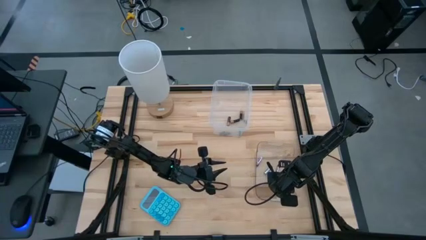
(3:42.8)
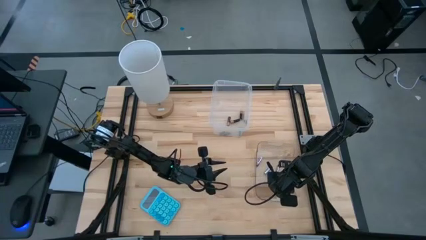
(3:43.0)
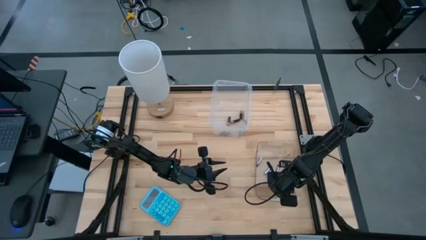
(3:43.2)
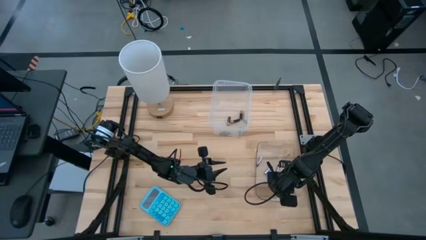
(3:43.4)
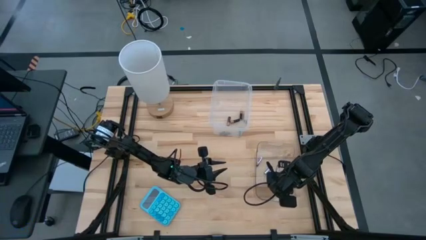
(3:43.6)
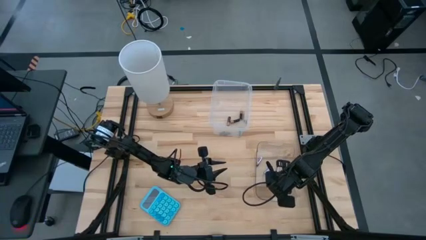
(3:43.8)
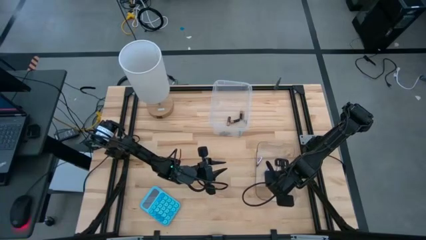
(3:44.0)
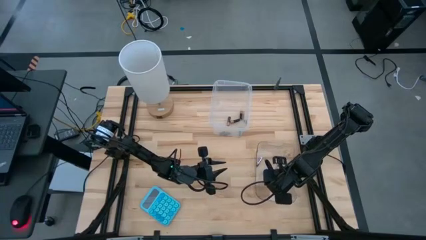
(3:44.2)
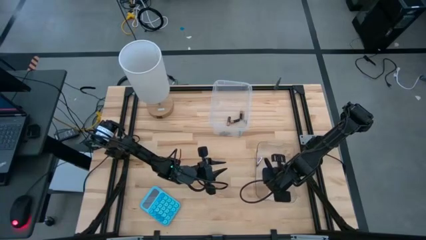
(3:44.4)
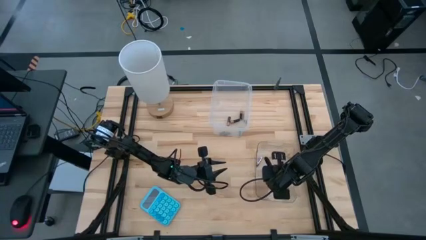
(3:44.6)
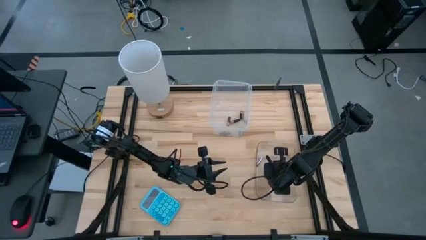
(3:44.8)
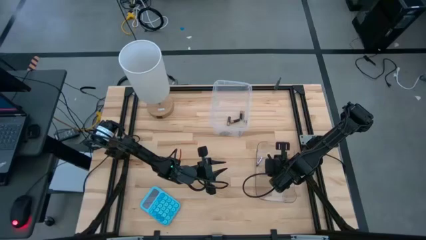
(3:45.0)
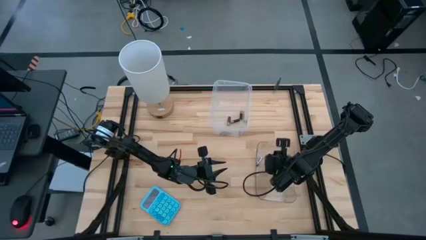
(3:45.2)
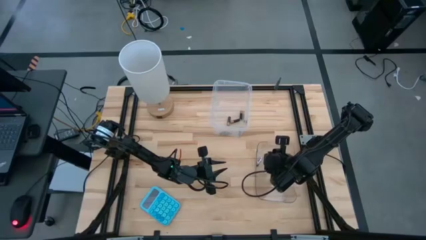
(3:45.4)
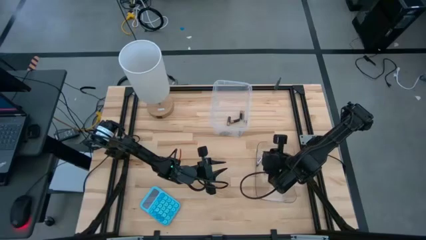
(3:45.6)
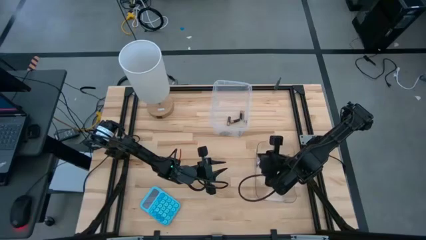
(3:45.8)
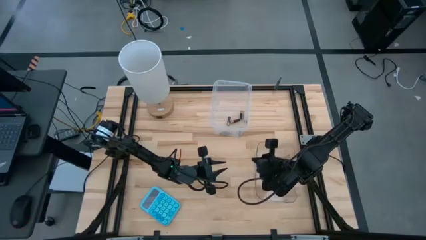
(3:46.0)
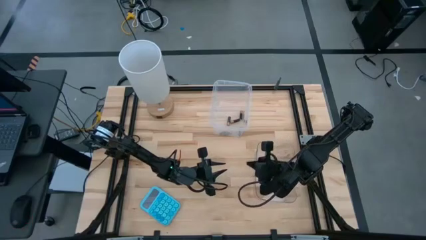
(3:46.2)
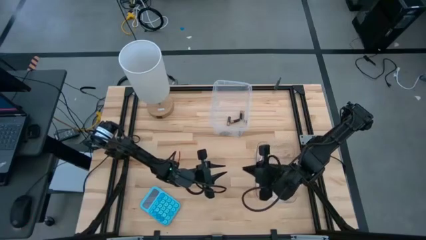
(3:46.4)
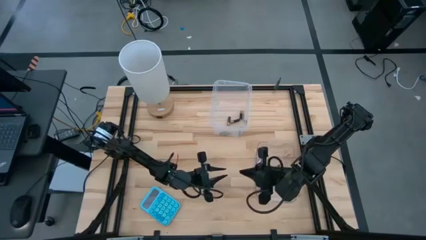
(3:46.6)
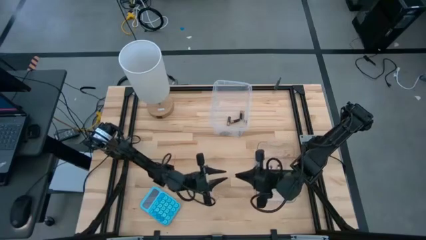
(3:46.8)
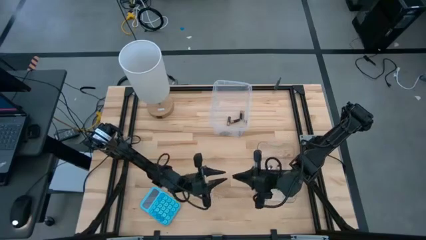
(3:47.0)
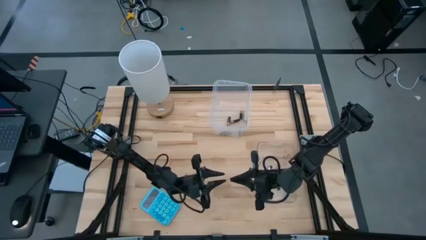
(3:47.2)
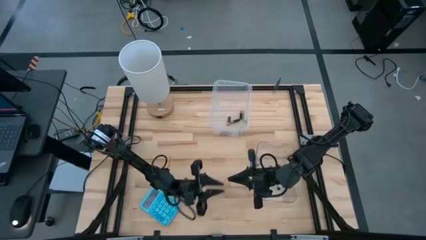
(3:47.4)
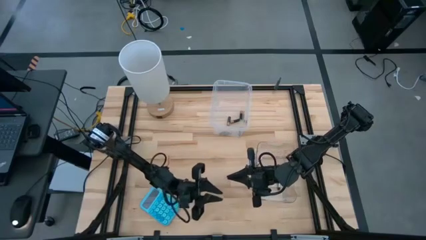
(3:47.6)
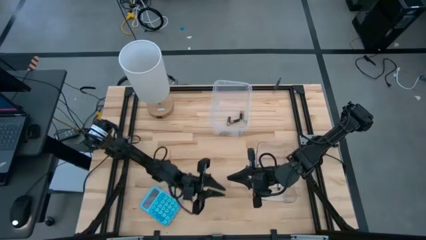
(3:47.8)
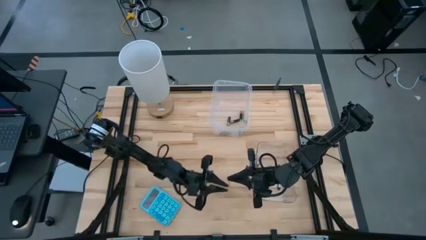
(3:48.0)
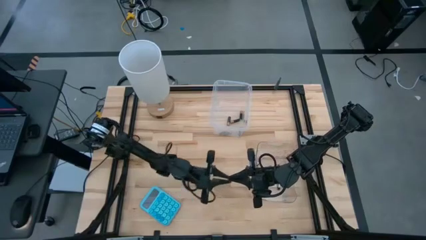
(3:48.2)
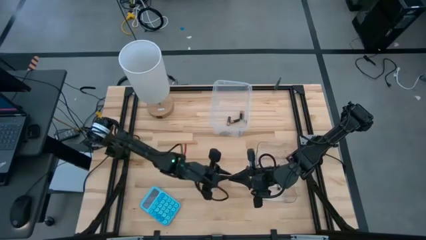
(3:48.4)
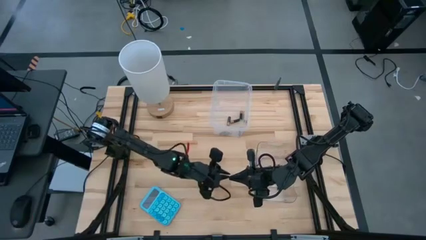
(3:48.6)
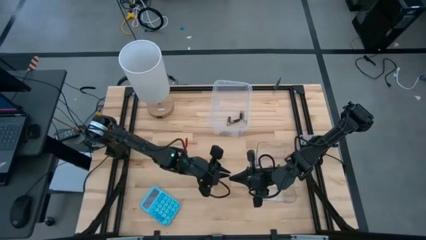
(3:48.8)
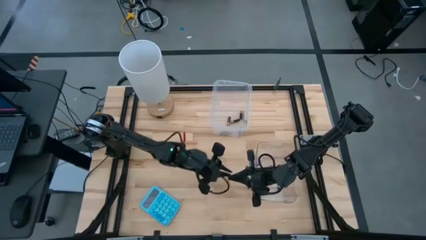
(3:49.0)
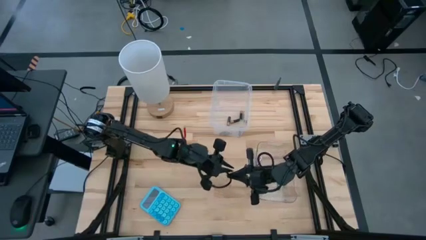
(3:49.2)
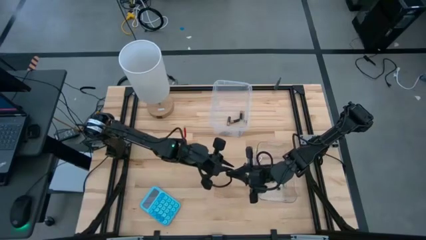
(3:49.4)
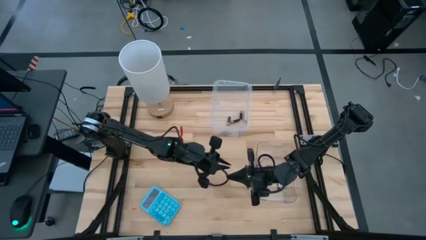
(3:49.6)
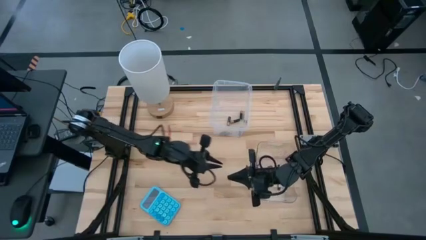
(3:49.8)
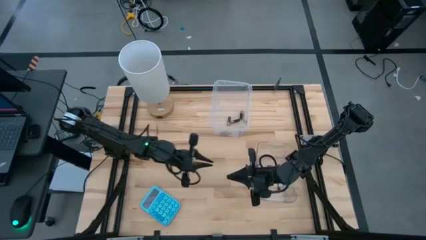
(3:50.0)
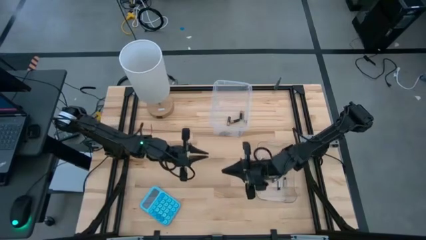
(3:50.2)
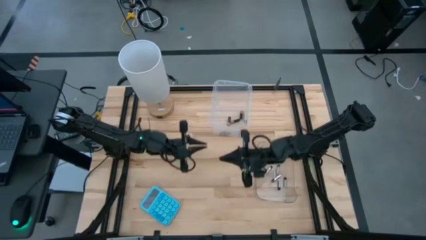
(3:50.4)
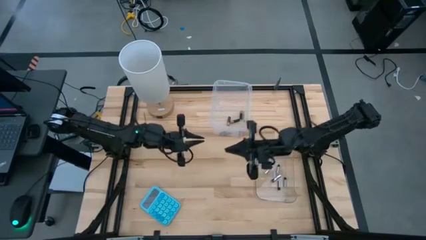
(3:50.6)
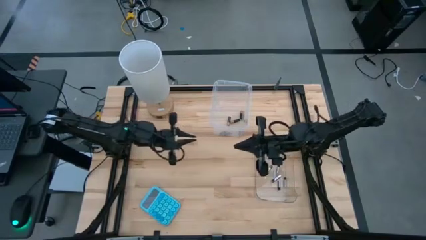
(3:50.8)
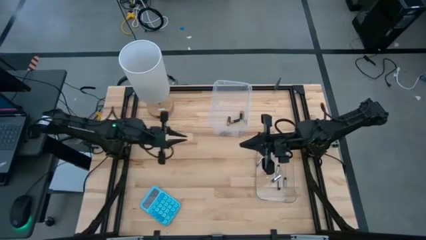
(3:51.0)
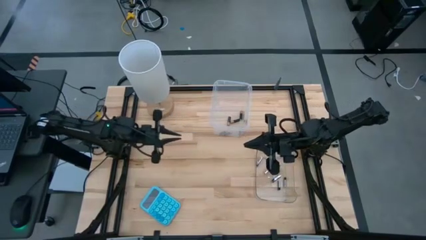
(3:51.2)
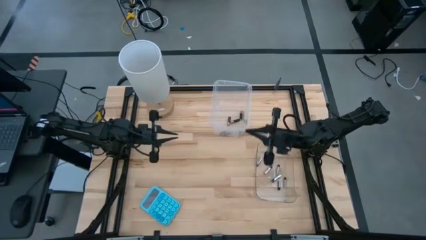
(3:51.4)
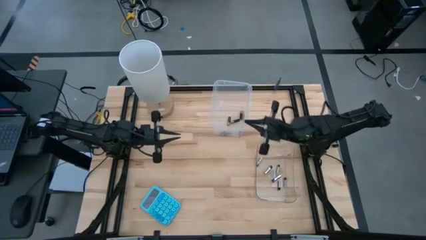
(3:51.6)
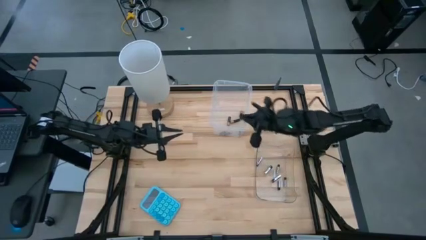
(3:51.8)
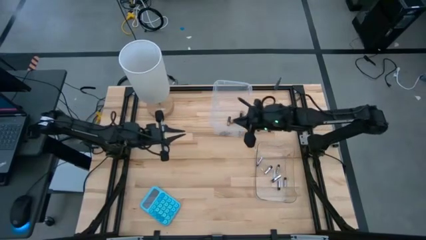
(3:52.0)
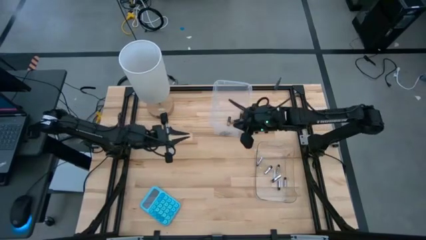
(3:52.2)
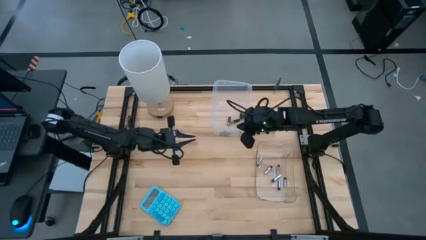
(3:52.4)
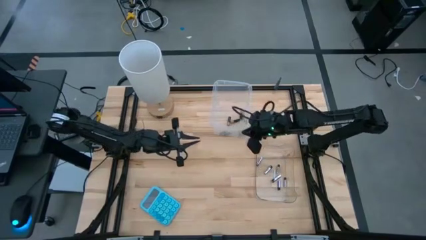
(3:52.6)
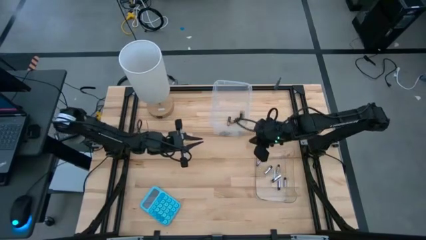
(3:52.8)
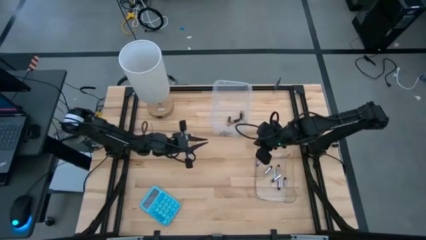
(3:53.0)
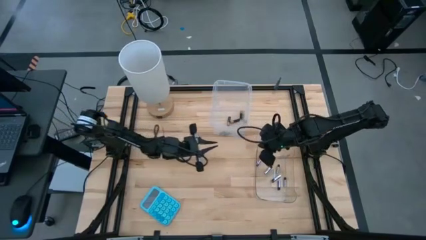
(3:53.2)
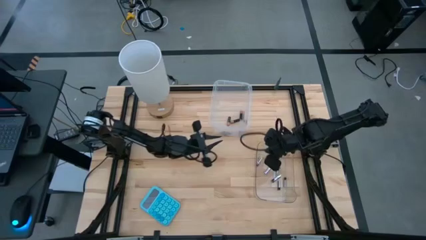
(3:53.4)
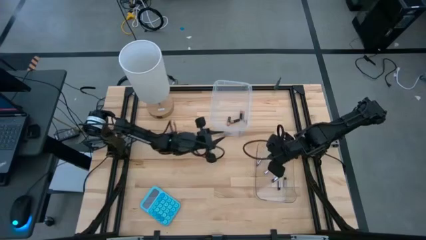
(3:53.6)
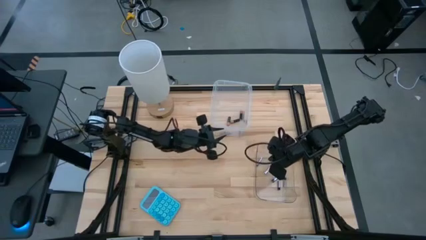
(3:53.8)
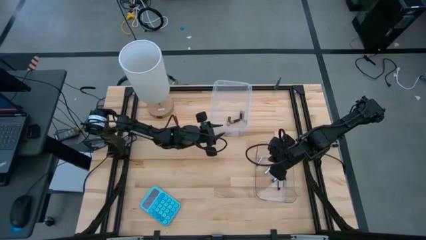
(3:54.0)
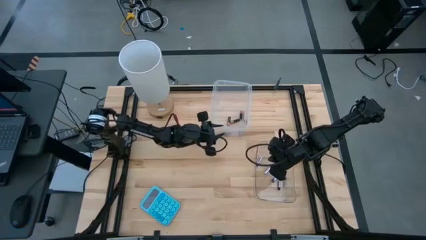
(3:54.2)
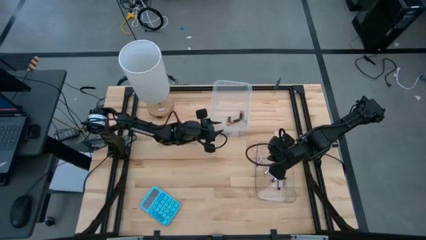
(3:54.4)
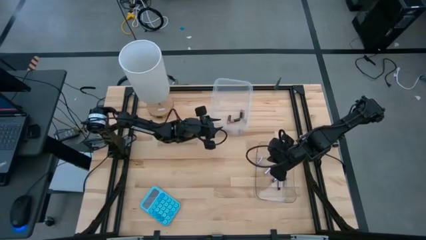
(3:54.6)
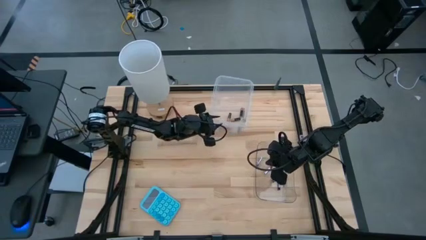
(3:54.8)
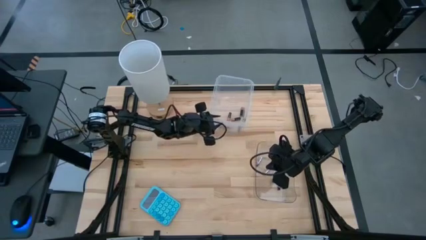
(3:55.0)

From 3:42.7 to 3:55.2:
Task: Sort batteries
Adjust the transparent bins

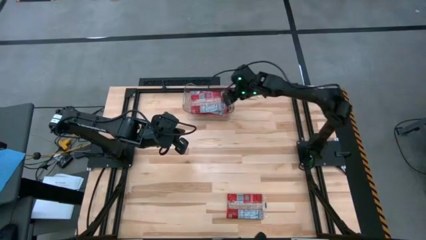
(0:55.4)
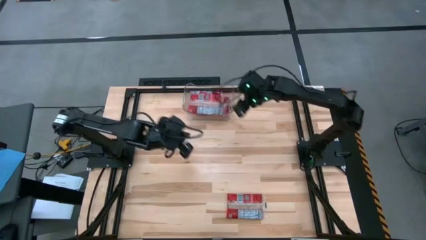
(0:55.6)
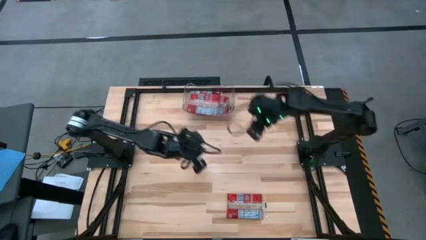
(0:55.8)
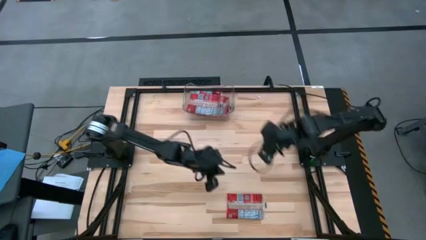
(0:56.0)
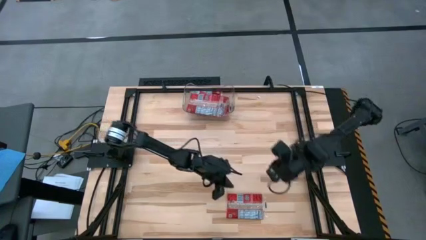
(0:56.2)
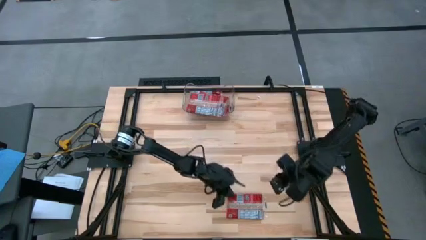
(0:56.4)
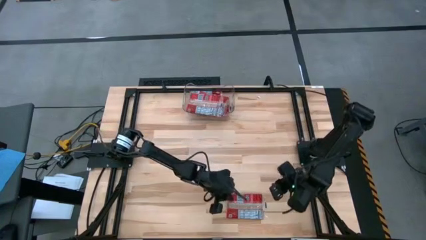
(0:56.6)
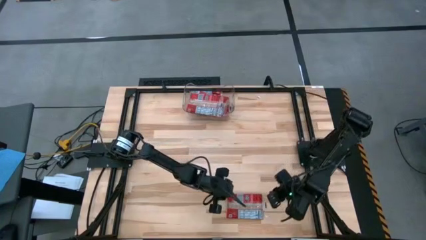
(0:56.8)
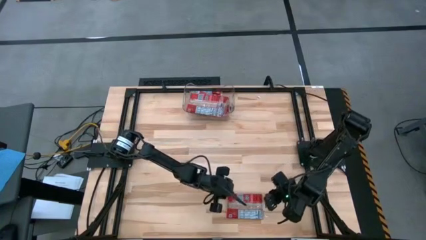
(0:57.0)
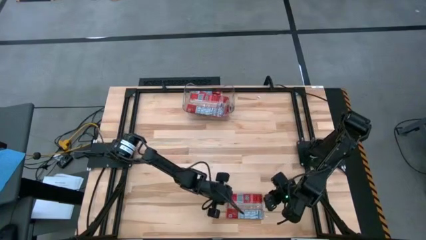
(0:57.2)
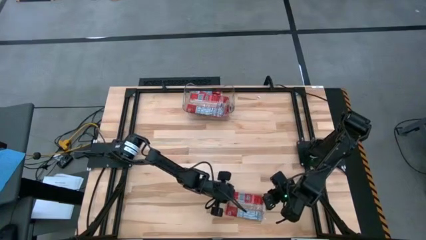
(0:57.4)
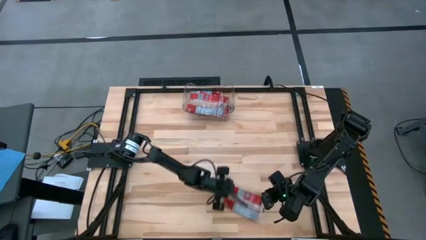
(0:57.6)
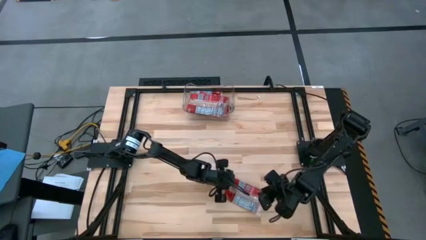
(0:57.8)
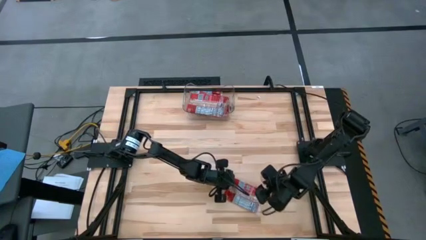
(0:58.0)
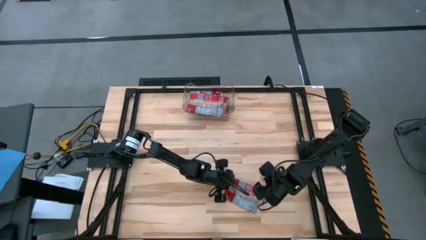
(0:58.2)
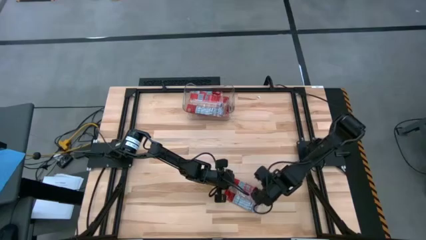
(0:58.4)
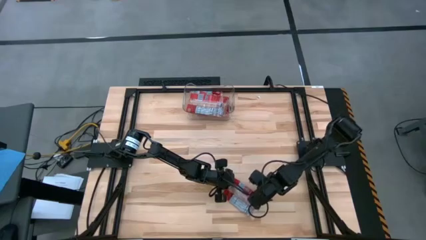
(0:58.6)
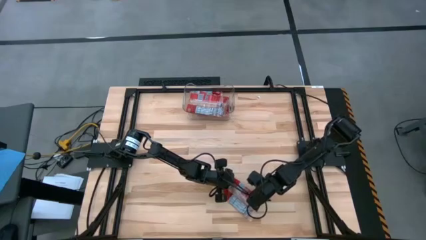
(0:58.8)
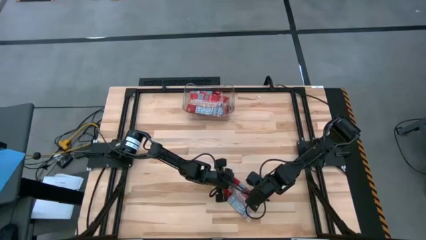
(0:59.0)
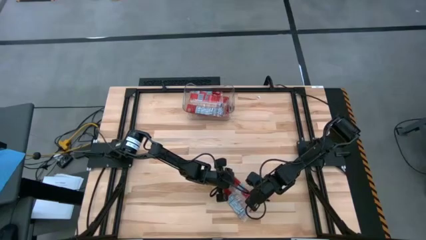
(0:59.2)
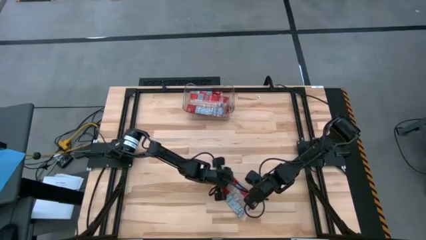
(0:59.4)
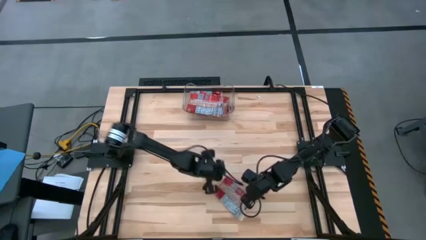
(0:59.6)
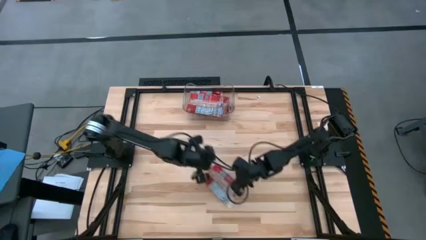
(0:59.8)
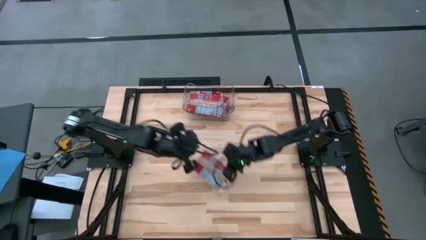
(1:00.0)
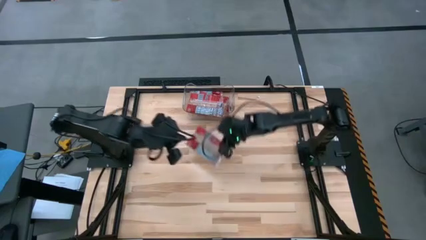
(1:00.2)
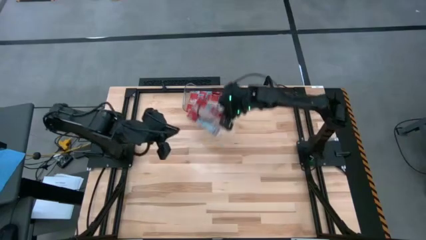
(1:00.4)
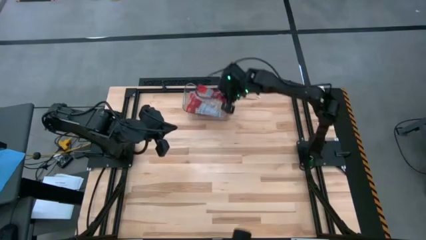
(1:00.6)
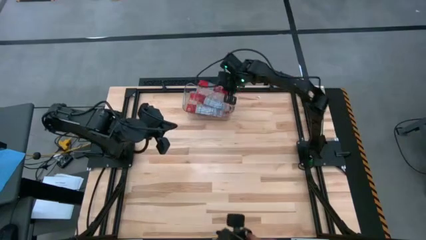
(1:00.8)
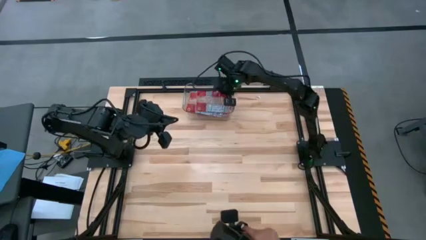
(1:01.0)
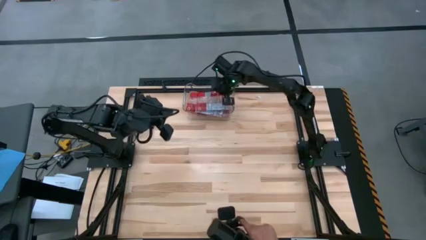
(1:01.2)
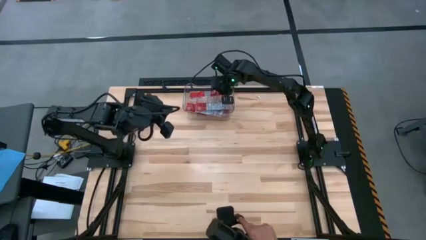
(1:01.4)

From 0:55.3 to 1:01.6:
Task: Sort popcorn bags into baskets
Put the red popcorn pack into the transparent bin
